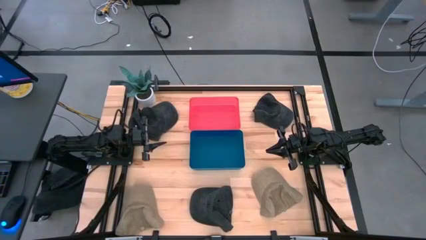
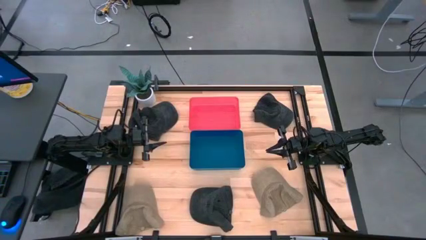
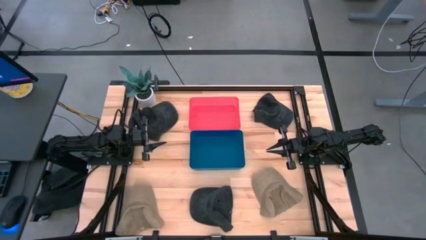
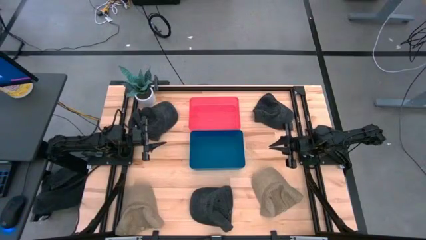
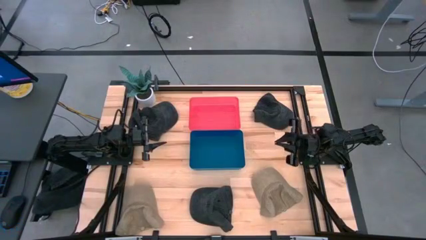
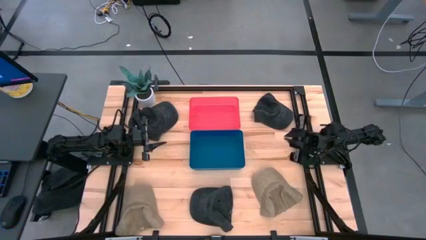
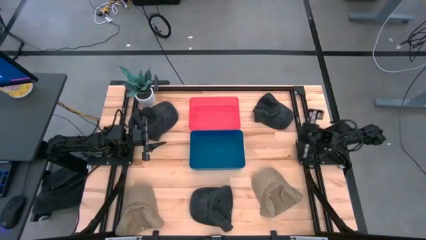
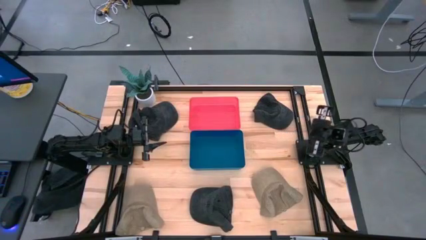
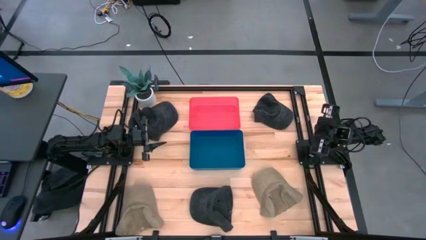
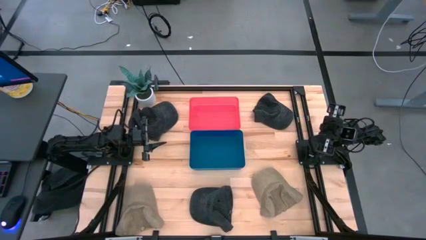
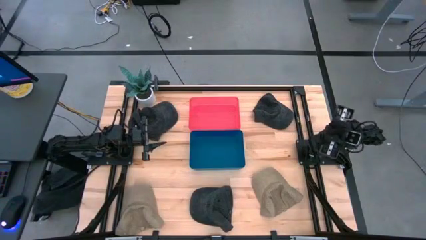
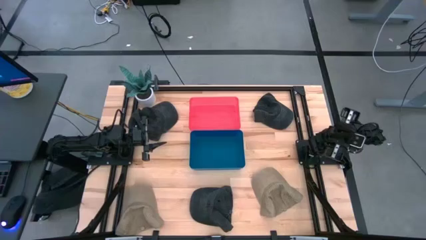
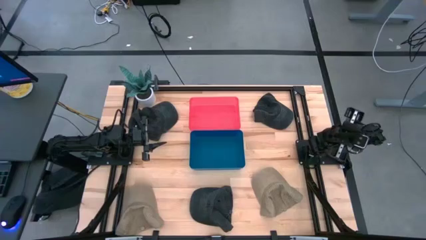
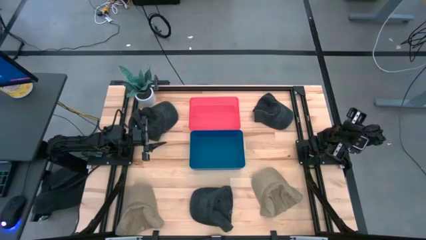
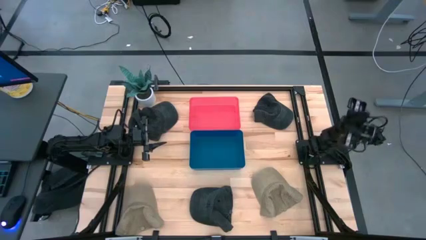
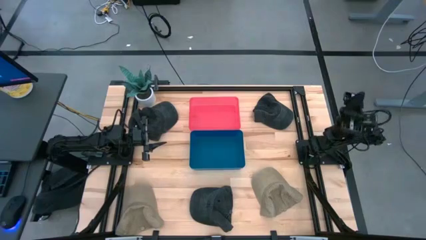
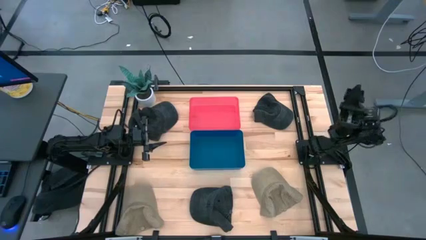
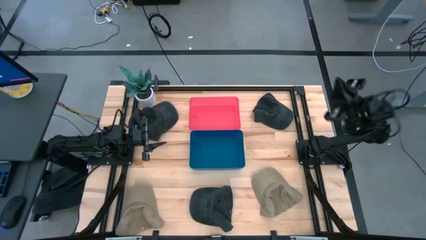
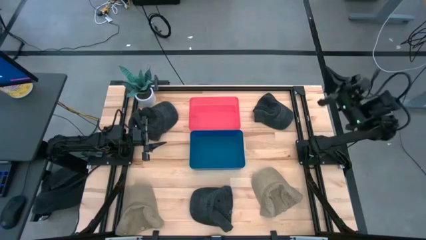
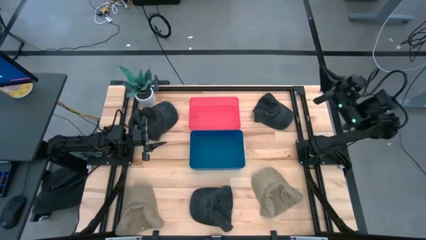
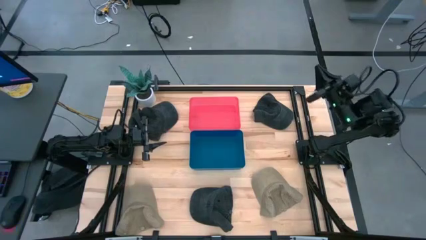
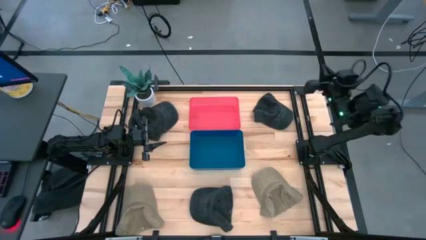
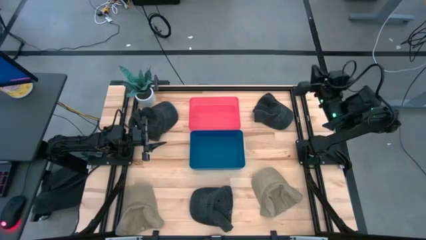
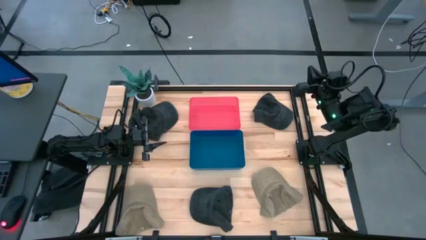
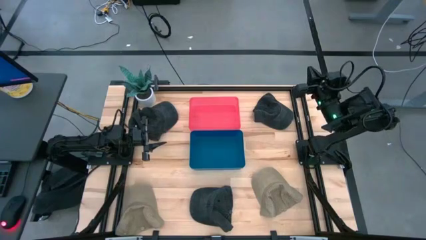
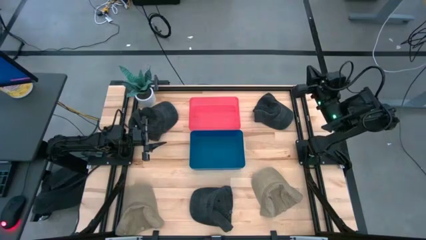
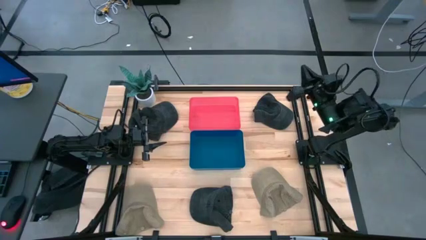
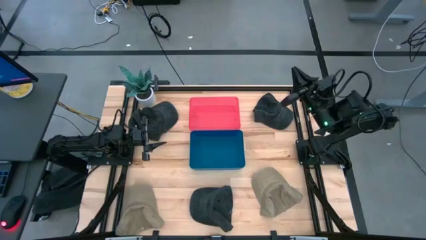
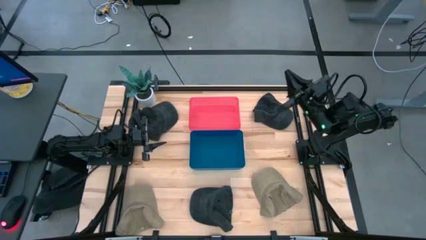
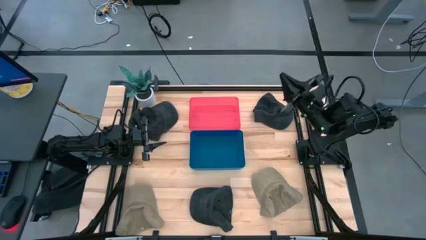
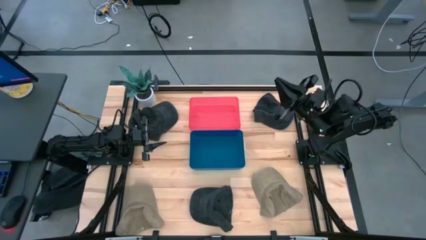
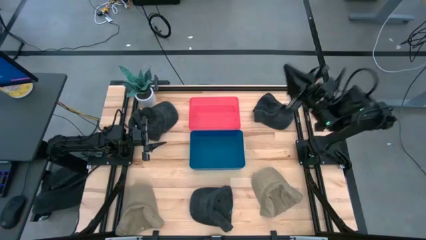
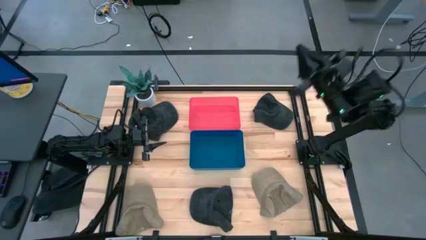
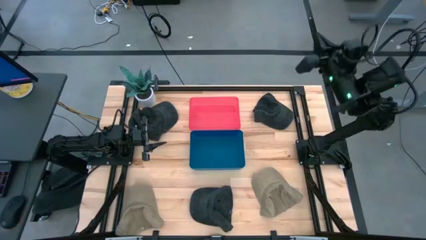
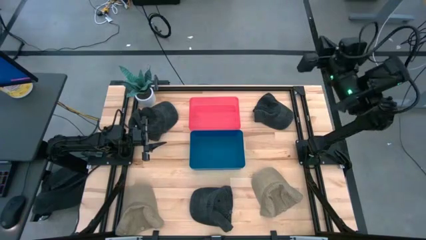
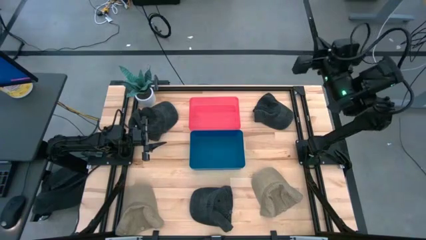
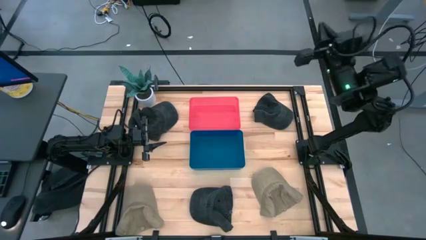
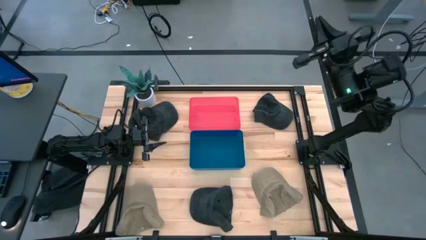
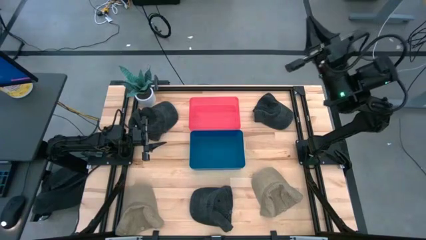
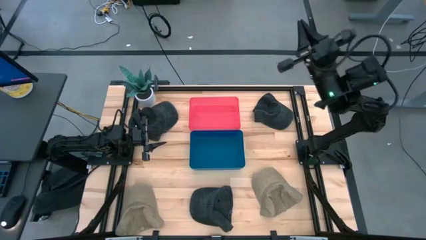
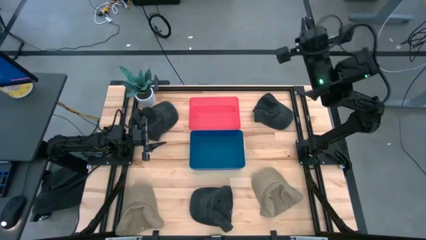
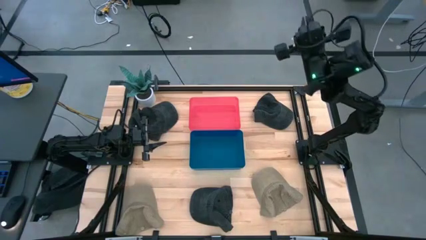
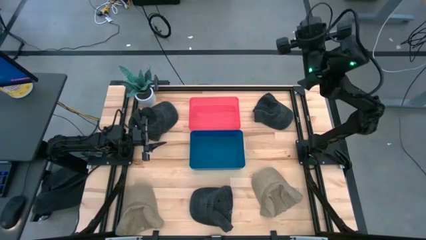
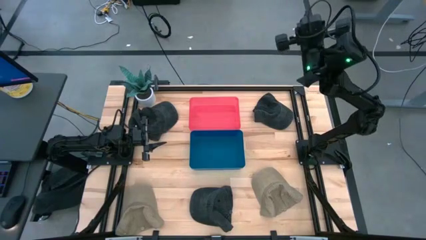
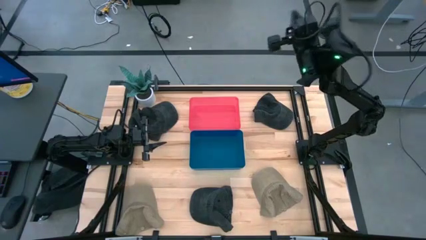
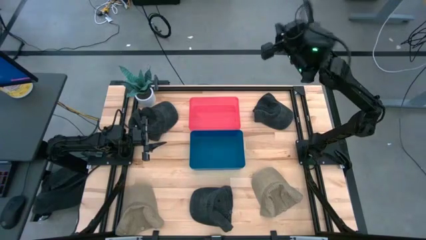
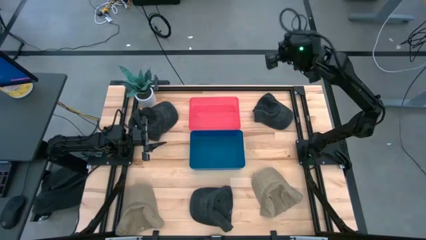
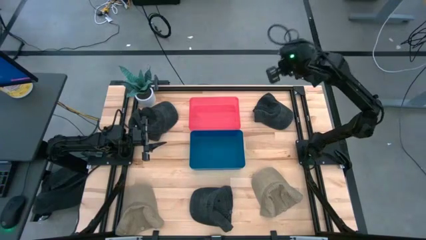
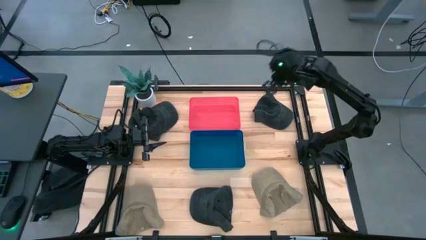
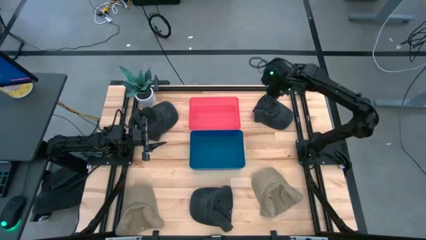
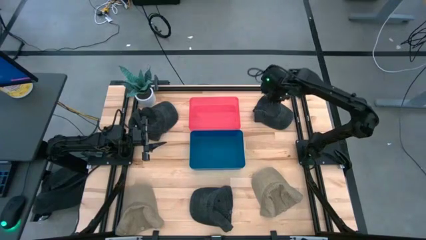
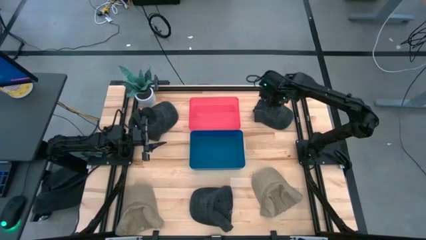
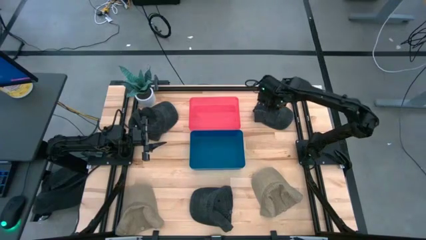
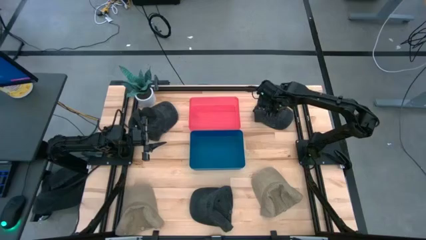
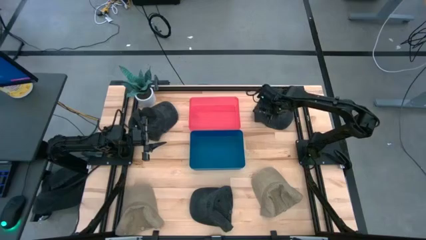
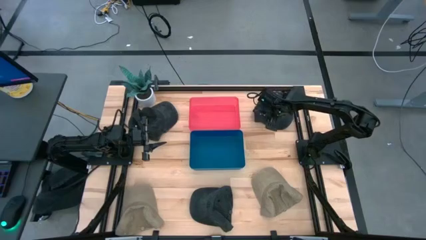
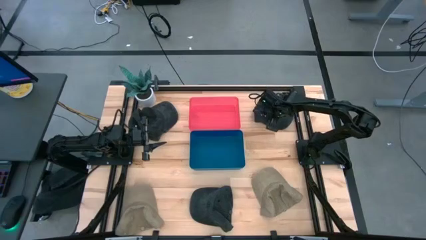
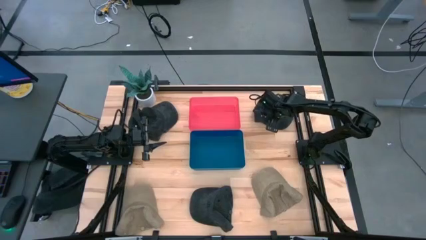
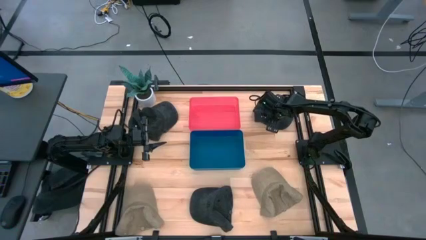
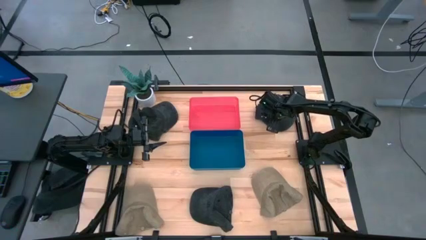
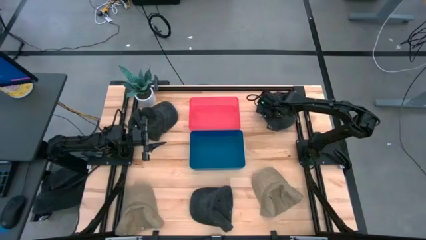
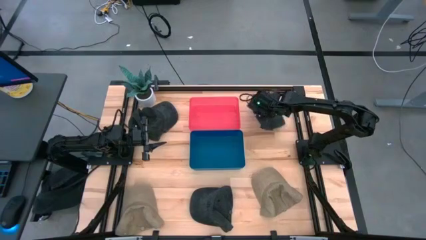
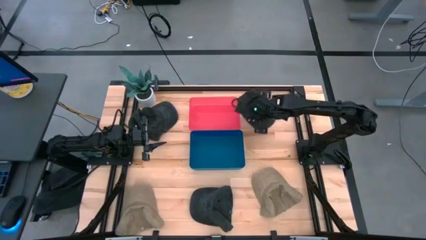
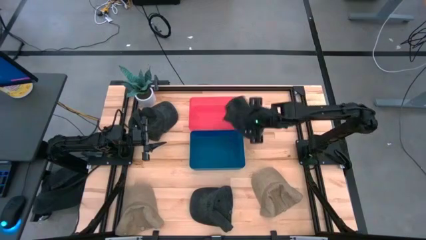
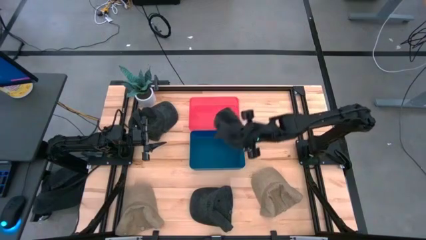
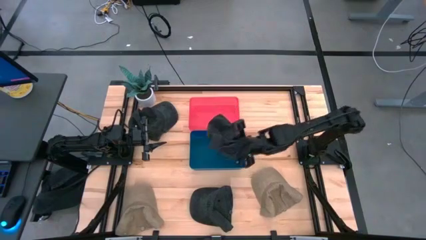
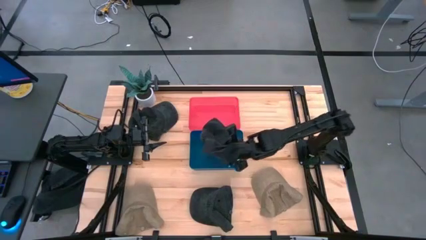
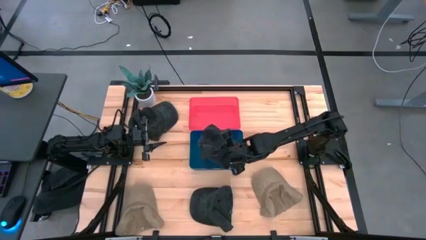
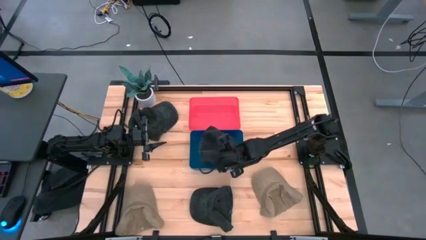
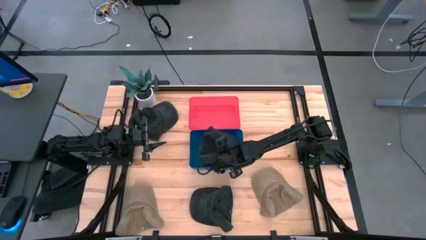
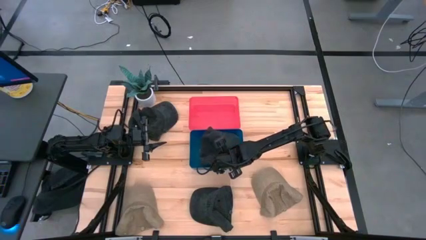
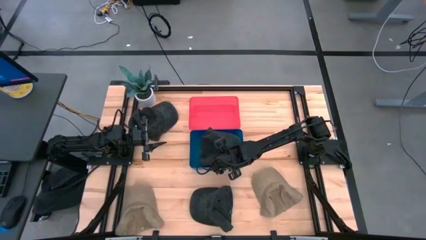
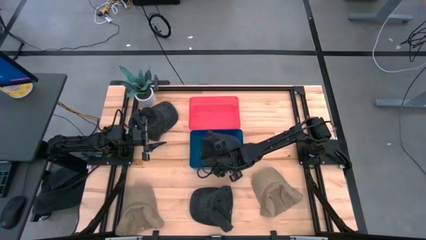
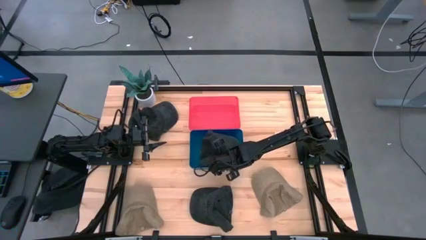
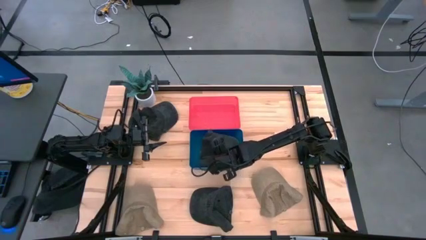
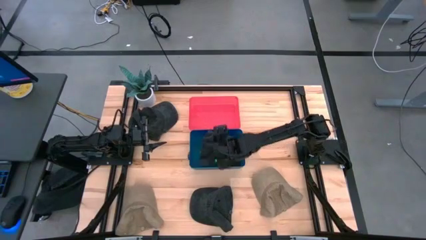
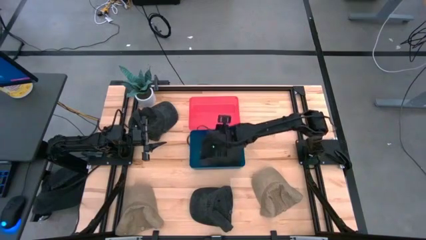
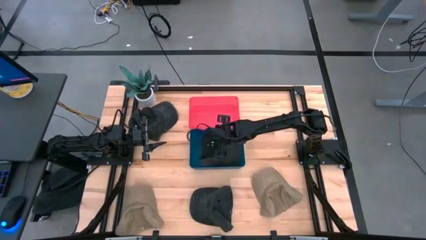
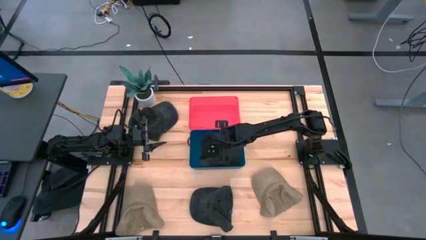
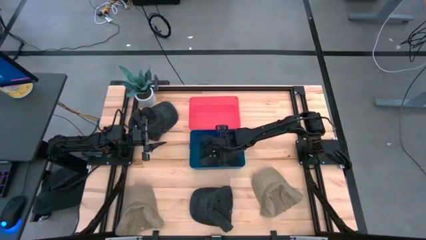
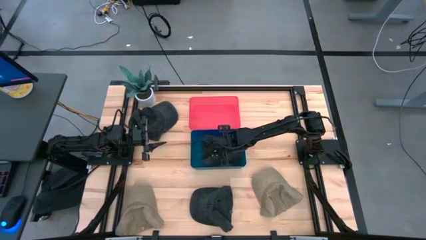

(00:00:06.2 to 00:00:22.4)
Task: Pick & Place hat
Put the top right black cap into the blue bin
